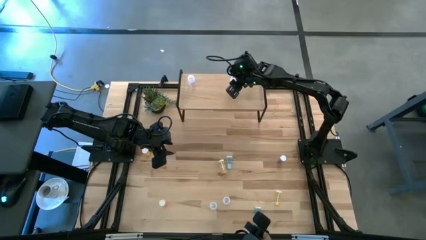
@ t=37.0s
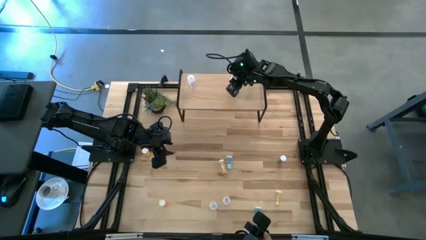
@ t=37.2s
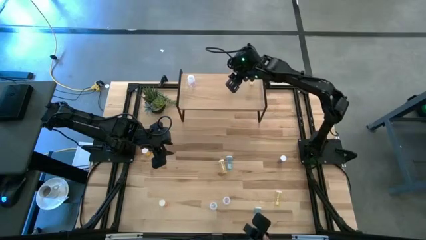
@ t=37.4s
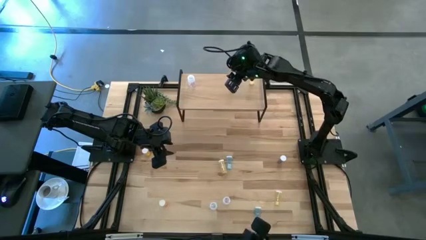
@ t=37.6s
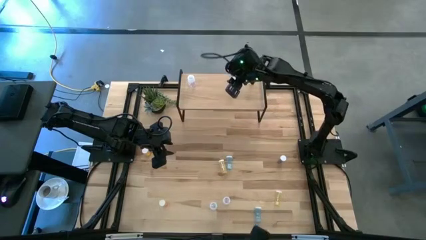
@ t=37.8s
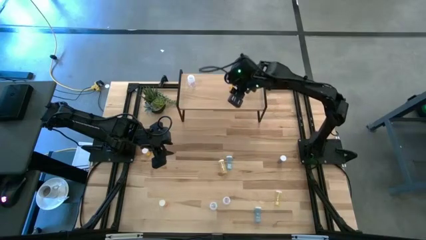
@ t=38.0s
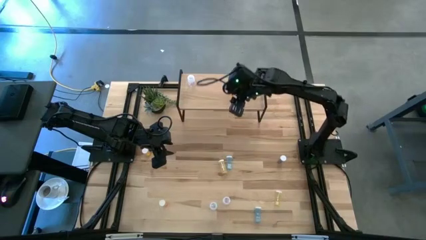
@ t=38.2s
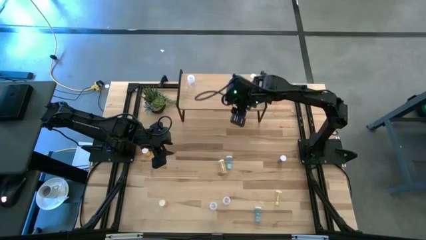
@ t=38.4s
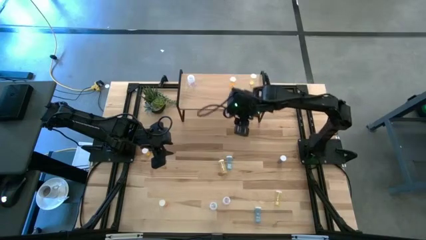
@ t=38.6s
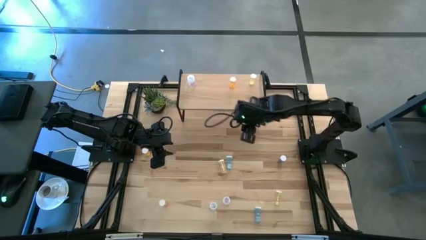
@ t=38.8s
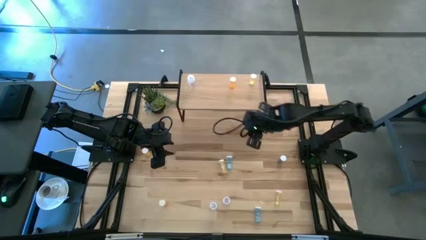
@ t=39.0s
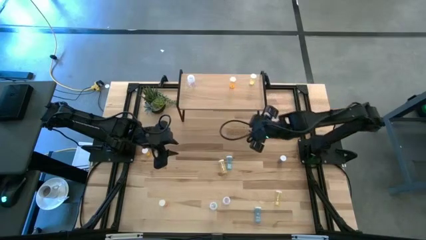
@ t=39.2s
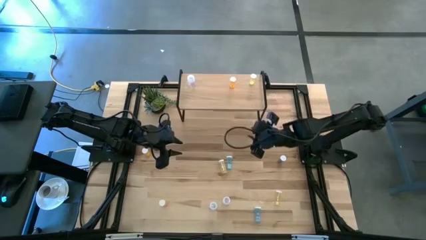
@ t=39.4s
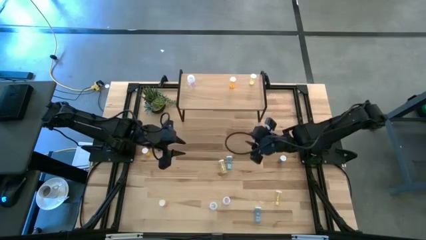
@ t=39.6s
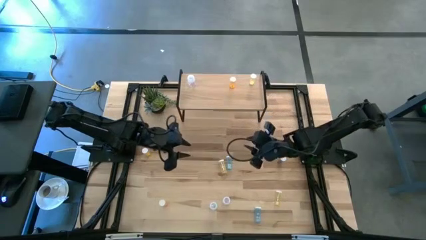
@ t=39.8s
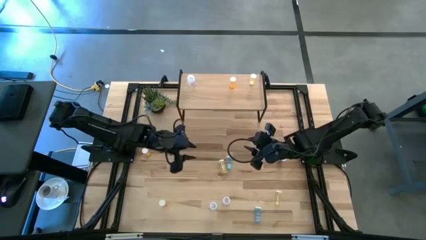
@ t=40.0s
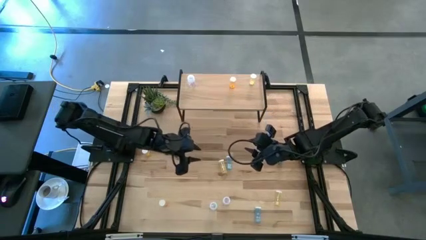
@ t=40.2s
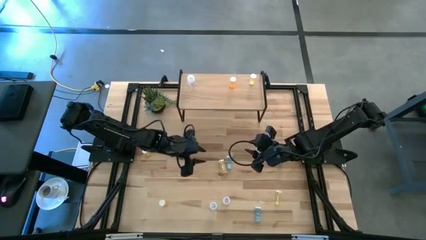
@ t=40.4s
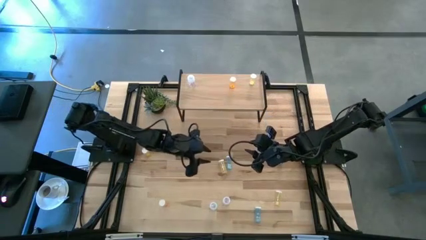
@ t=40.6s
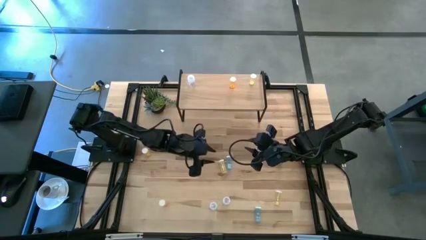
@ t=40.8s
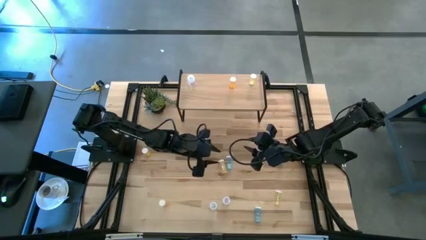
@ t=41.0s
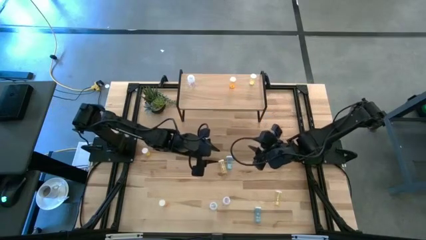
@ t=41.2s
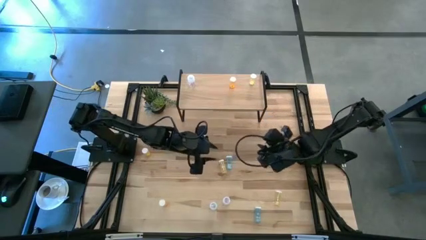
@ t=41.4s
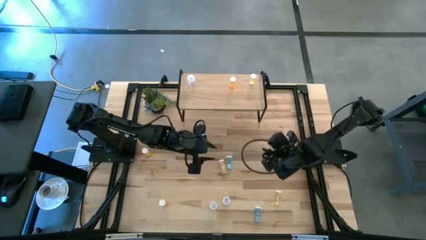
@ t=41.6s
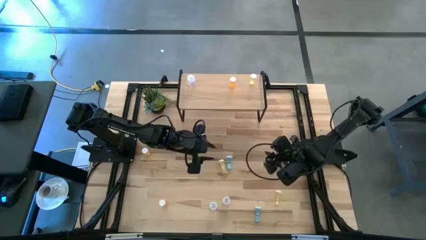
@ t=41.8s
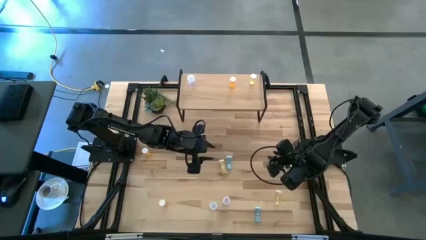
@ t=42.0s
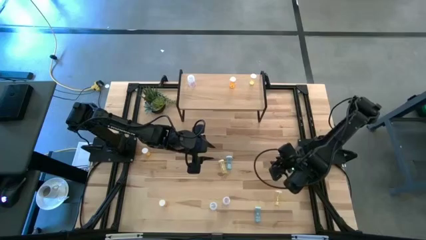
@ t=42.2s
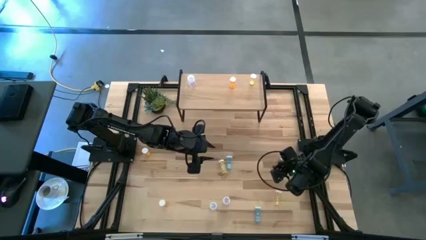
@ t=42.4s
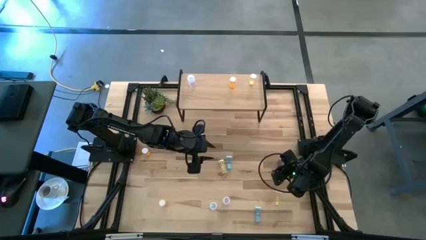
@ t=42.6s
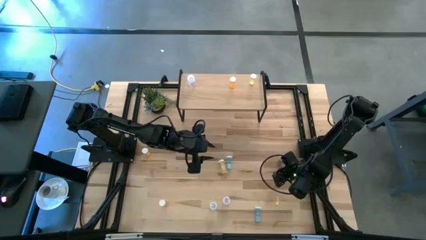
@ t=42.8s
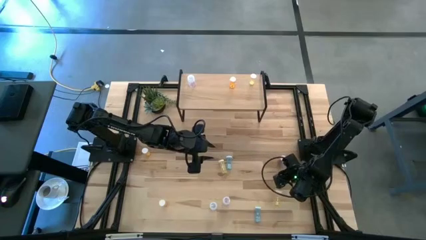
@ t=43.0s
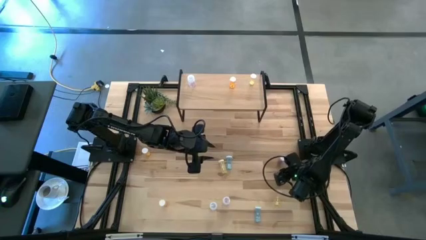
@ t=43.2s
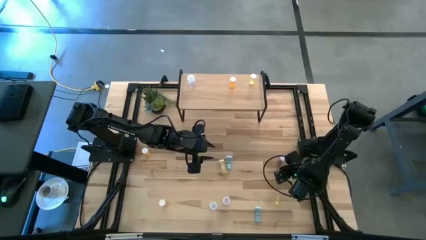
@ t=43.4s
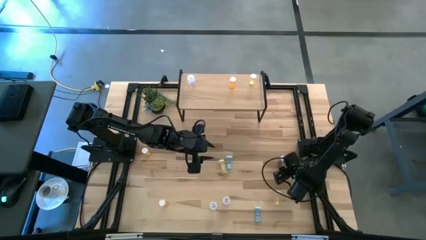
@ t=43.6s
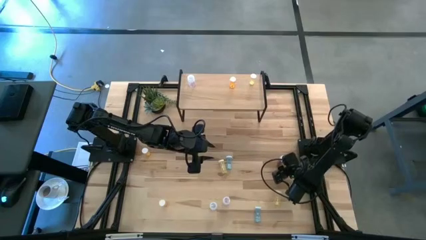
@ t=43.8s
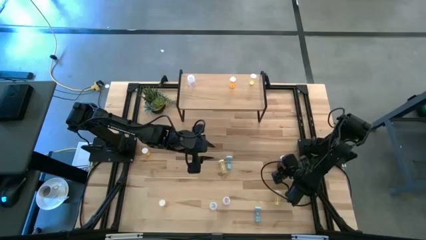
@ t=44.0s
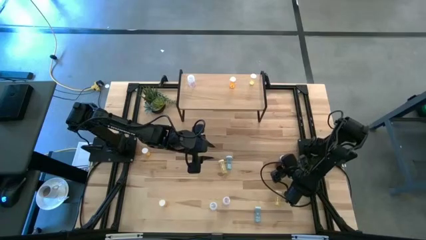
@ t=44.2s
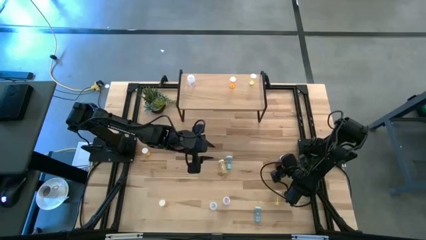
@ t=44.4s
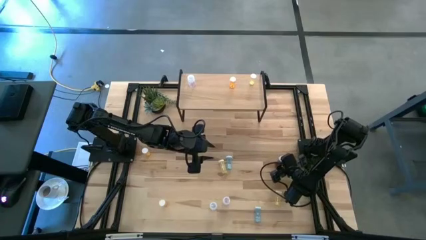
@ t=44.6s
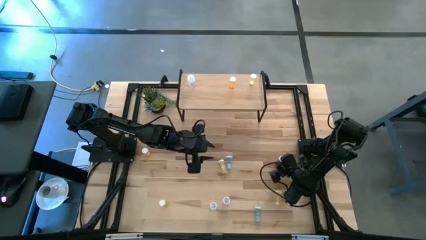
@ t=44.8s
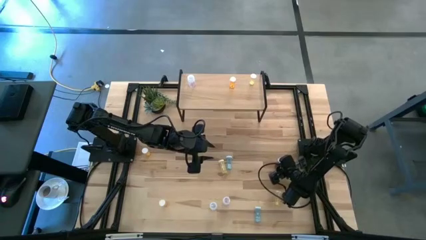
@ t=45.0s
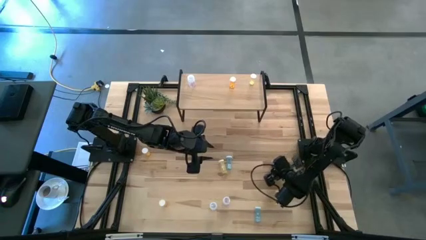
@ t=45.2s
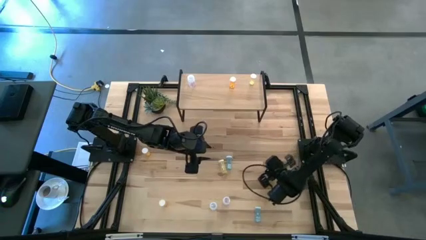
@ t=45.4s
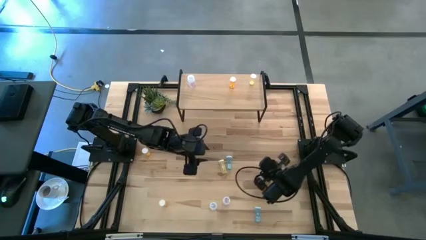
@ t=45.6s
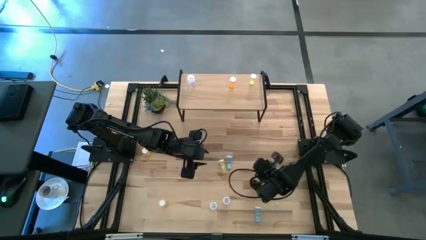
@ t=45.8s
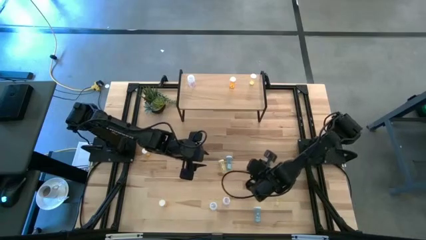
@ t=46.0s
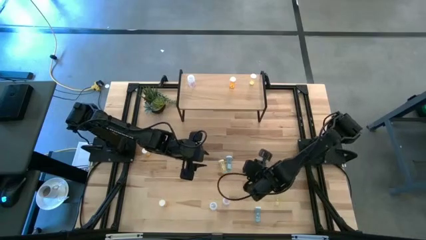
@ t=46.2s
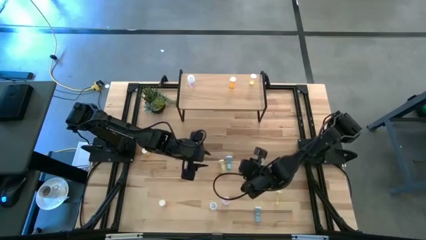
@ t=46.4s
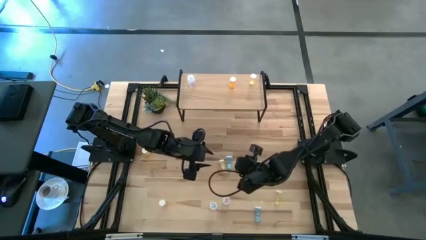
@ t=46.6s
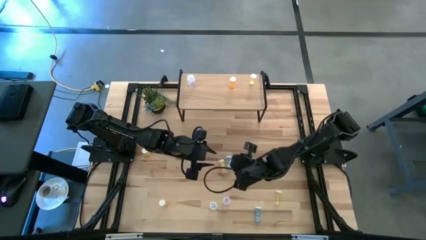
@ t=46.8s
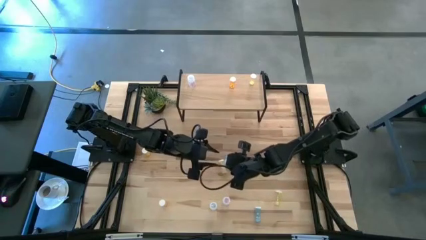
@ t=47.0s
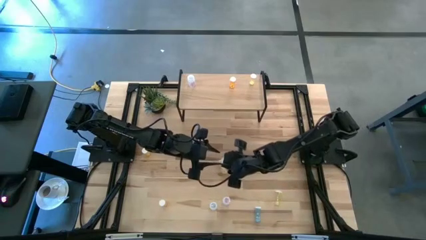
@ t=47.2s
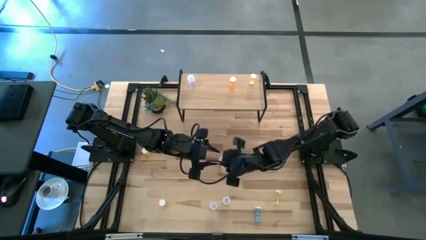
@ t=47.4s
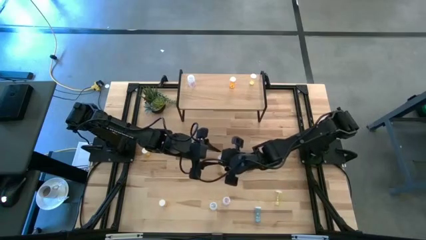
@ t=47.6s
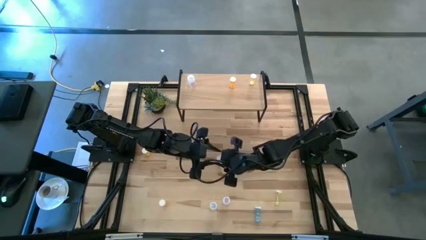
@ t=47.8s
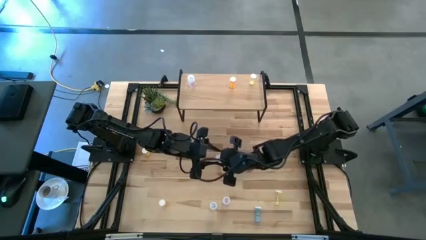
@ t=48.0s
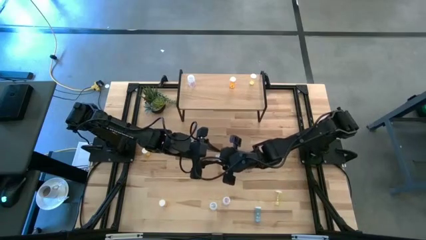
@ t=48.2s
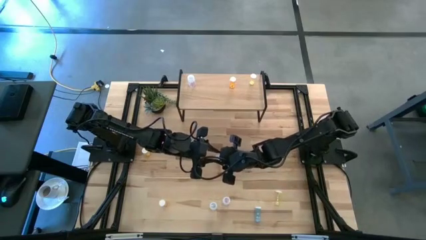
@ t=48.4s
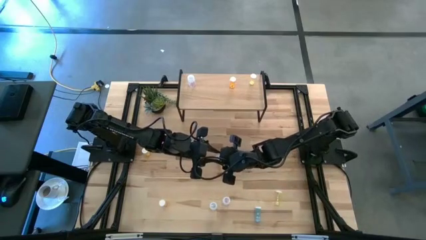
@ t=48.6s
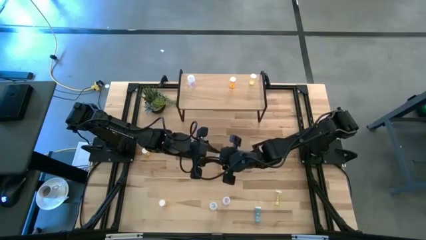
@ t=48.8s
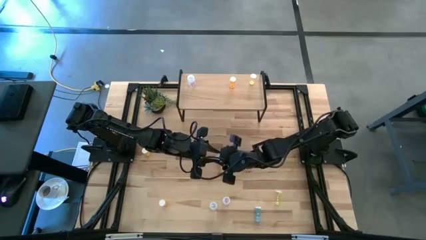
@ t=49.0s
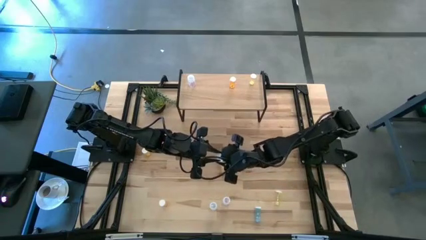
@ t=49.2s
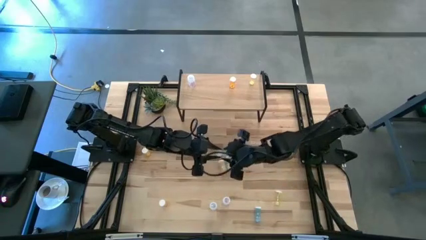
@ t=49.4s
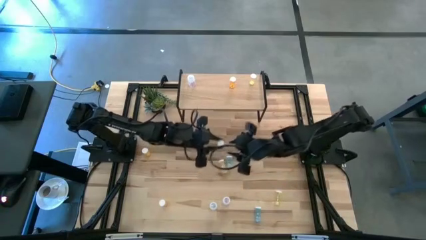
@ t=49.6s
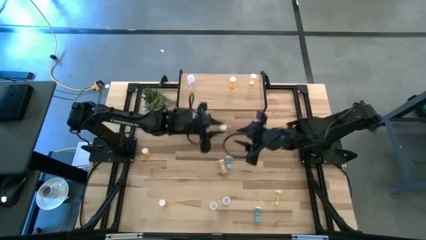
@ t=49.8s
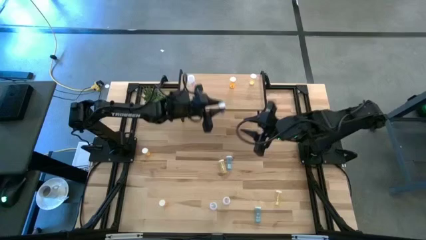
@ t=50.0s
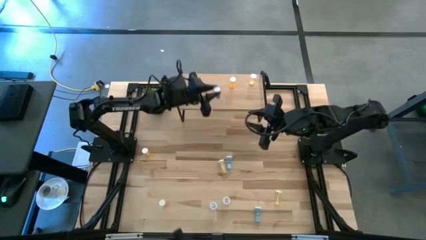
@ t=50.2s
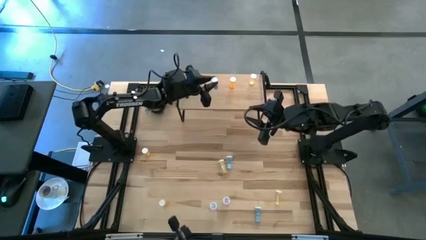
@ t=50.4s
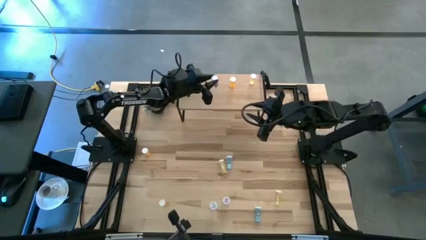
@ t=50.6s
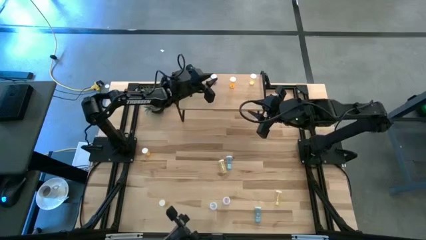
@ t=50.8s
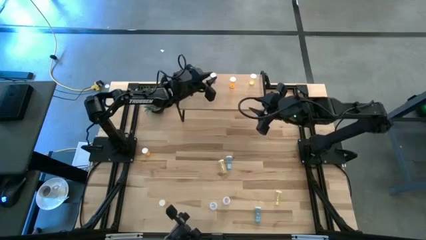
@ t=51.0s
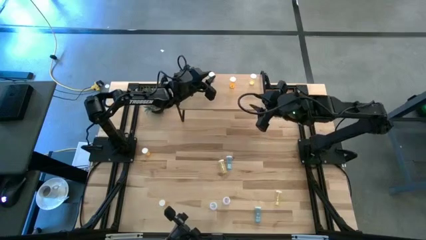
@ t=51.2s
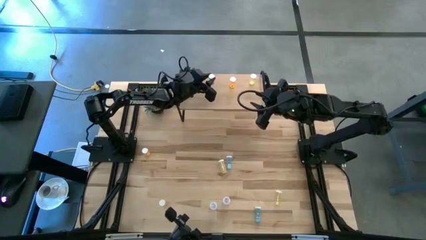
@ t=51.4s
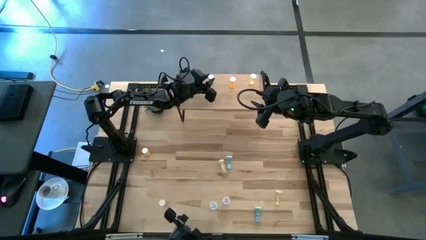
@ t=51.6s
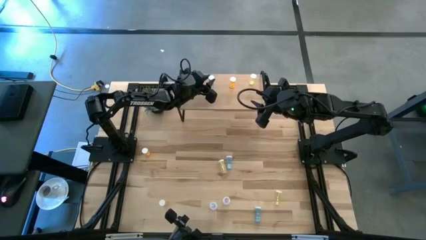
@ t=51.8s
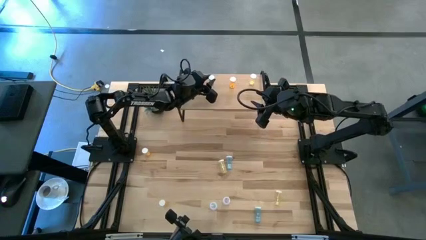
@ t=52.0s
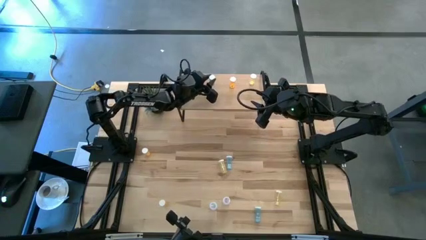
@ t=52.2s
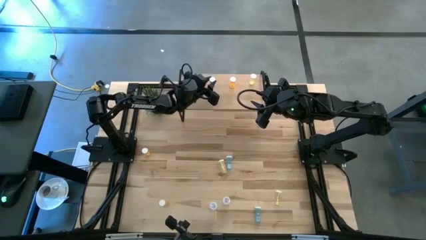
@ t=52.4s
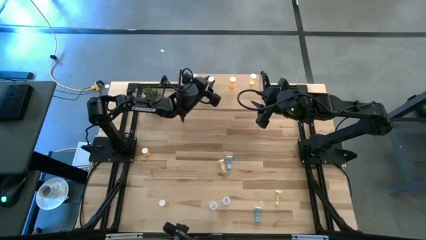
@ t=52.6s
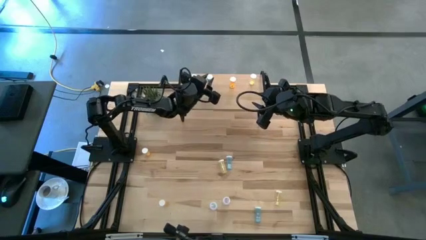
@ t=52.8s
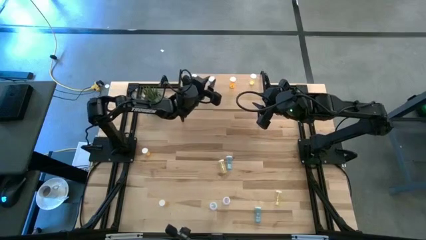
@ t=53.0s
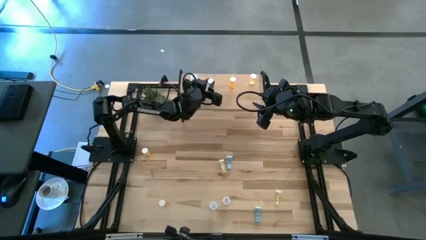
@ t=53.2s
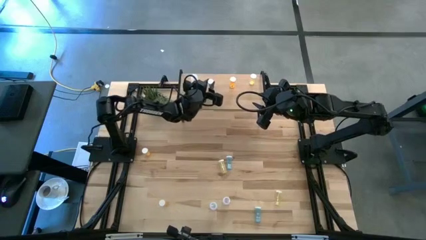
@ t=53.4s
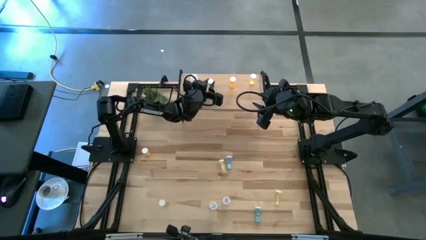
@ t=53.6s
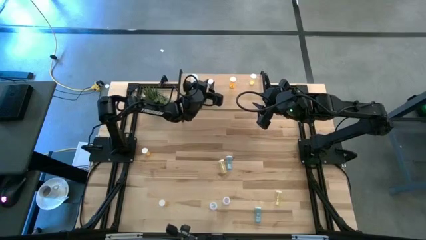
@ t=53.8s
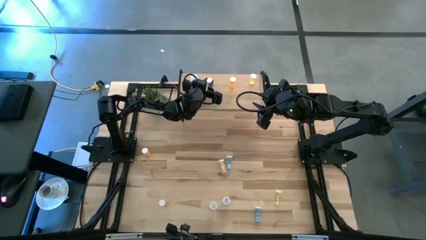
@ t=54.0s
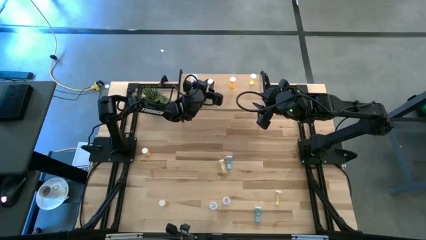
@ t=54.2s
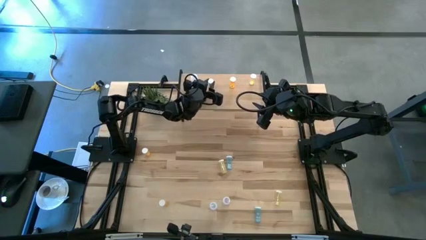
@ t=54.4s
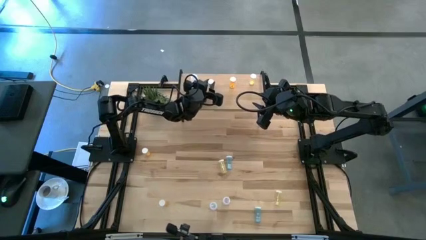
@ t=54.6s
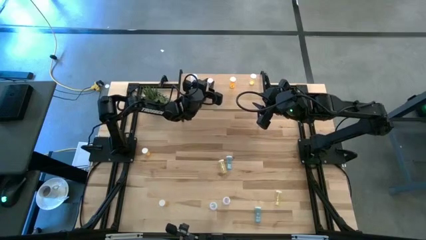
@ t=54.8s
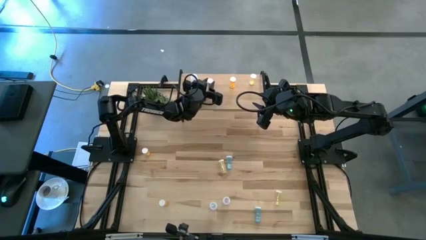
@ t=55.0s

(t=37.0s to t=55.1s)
Task: Pick and place medicine bottles onto shelf by color
Put the top right blue pill bottle on the shelf
